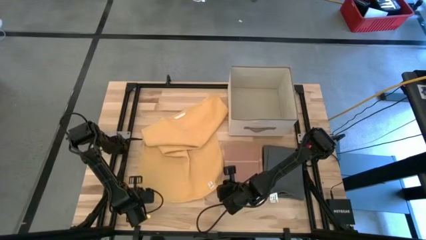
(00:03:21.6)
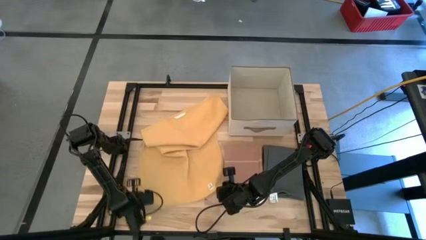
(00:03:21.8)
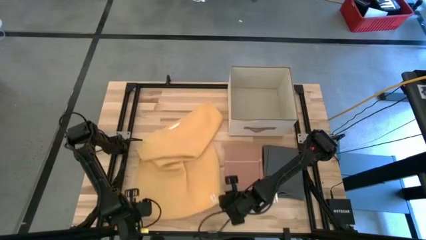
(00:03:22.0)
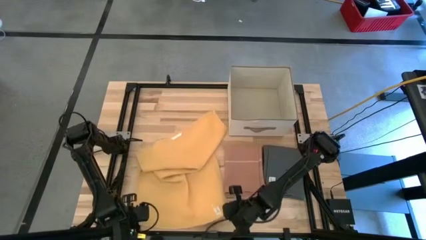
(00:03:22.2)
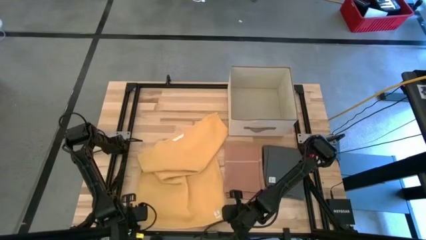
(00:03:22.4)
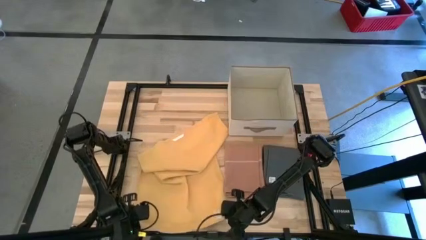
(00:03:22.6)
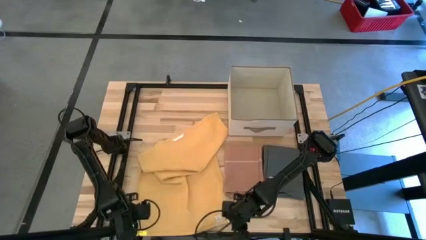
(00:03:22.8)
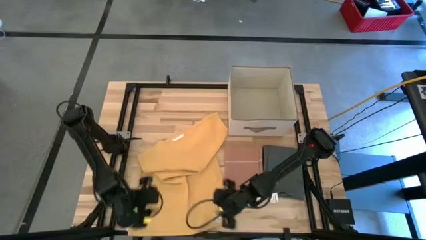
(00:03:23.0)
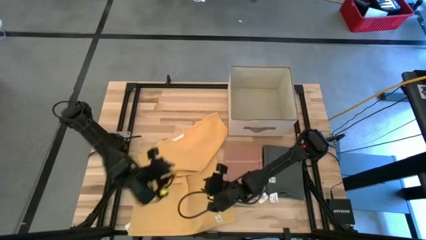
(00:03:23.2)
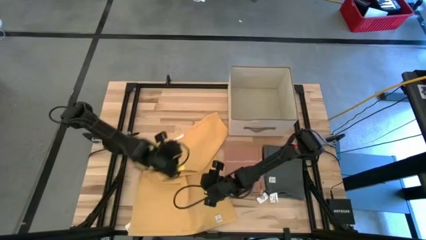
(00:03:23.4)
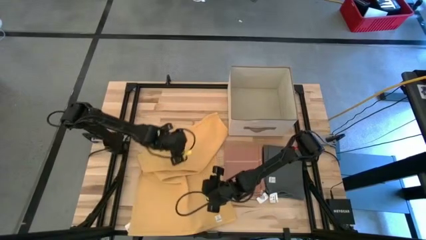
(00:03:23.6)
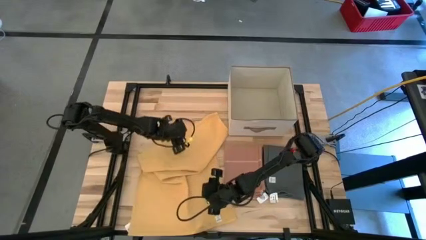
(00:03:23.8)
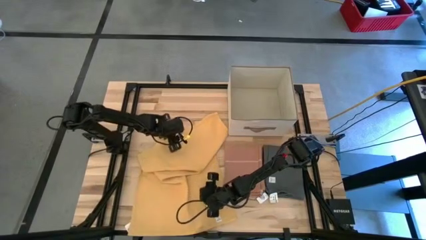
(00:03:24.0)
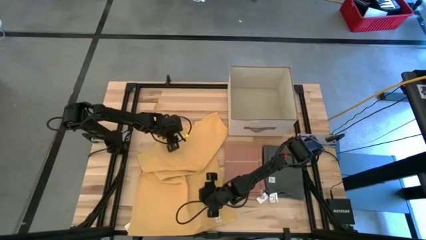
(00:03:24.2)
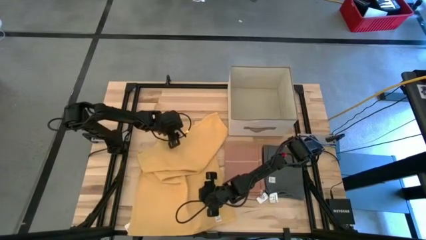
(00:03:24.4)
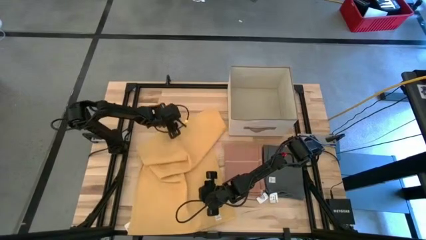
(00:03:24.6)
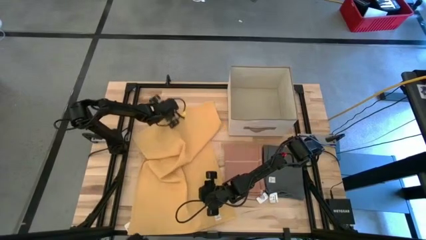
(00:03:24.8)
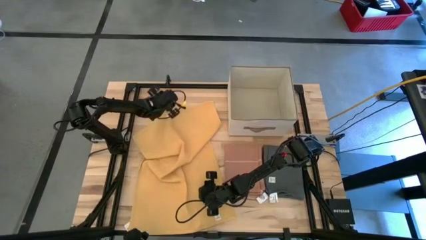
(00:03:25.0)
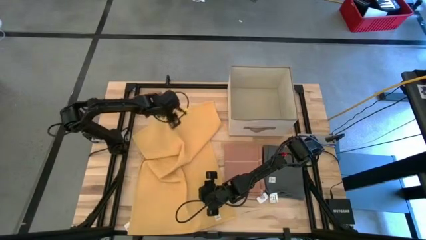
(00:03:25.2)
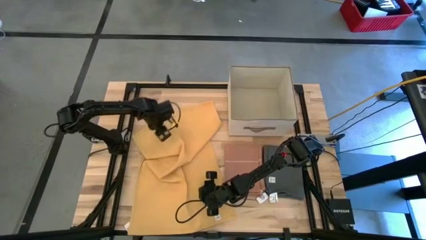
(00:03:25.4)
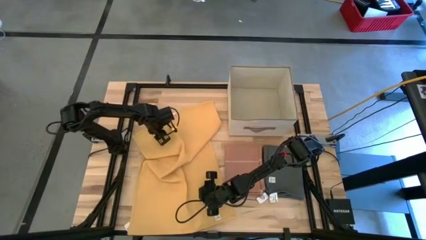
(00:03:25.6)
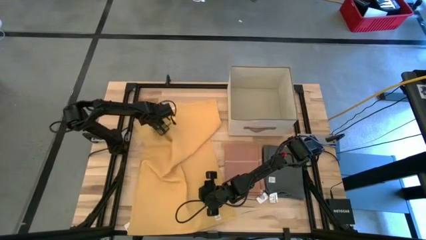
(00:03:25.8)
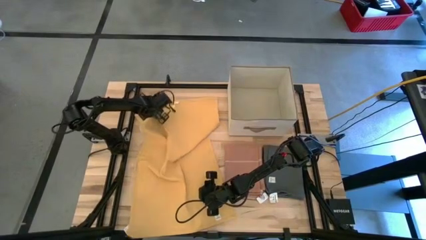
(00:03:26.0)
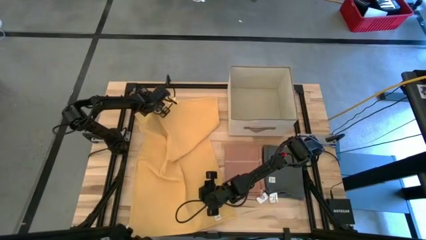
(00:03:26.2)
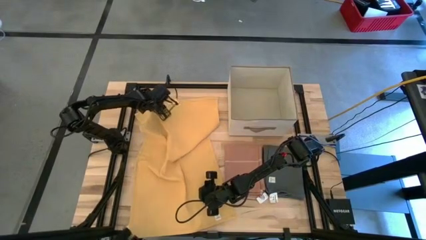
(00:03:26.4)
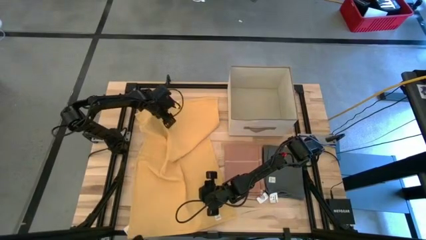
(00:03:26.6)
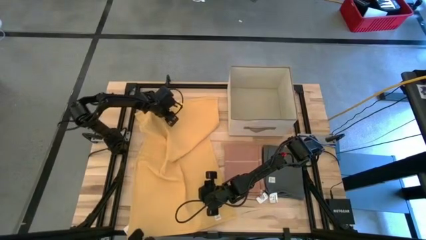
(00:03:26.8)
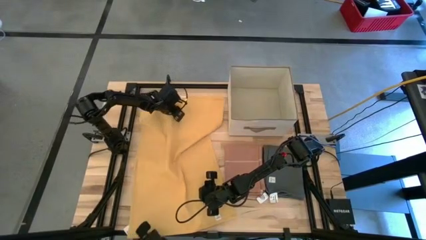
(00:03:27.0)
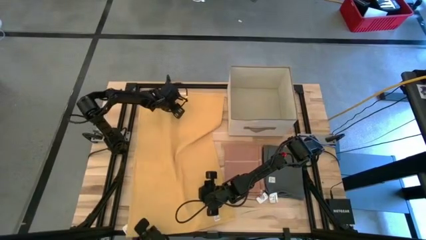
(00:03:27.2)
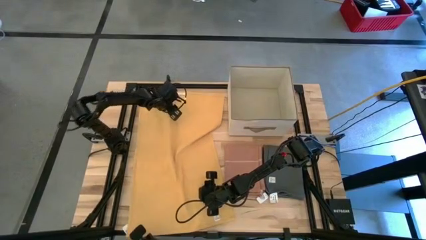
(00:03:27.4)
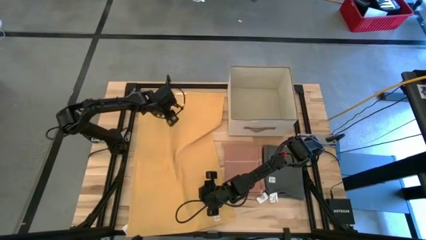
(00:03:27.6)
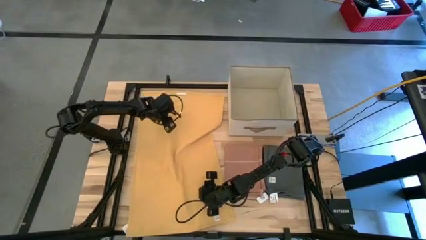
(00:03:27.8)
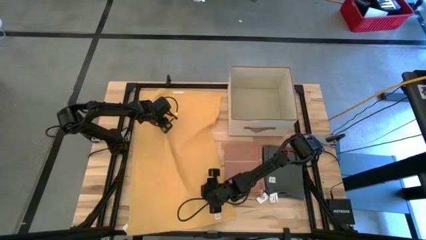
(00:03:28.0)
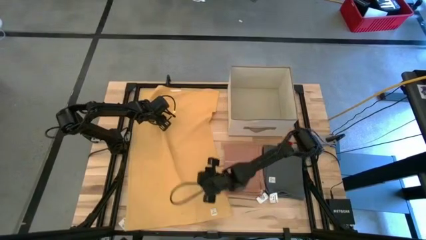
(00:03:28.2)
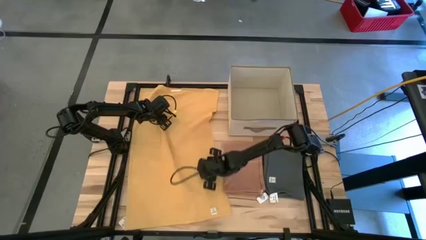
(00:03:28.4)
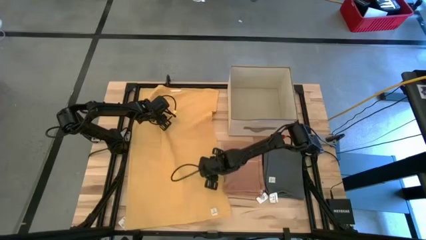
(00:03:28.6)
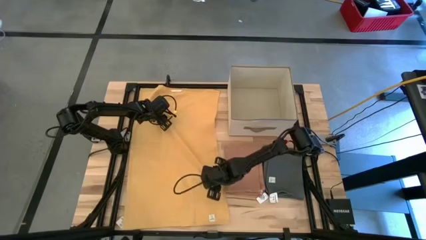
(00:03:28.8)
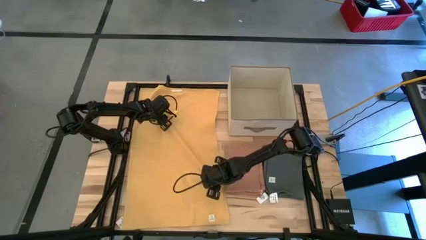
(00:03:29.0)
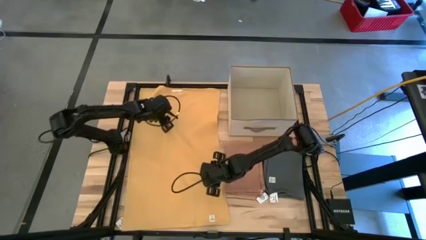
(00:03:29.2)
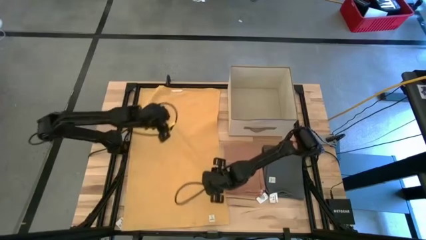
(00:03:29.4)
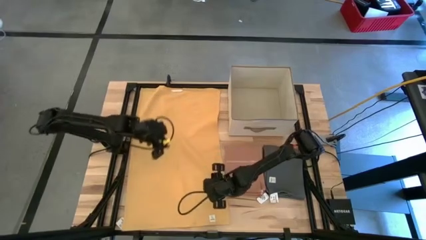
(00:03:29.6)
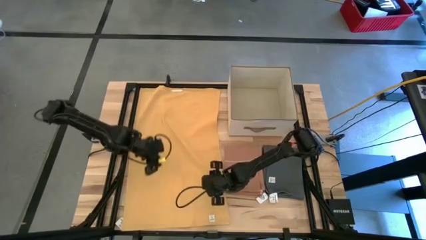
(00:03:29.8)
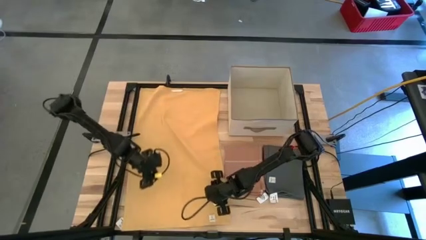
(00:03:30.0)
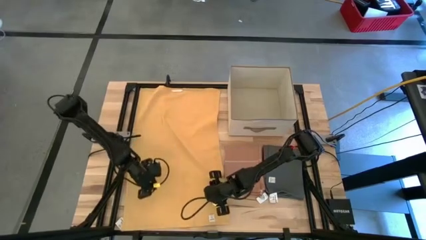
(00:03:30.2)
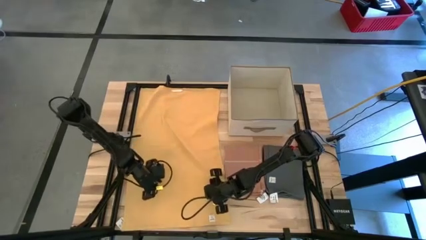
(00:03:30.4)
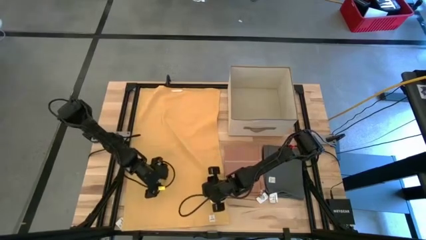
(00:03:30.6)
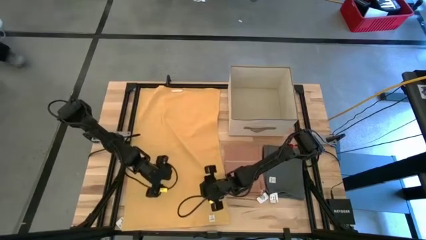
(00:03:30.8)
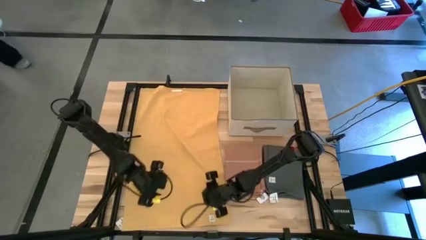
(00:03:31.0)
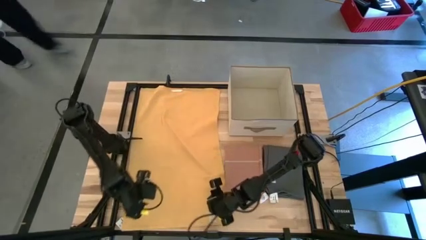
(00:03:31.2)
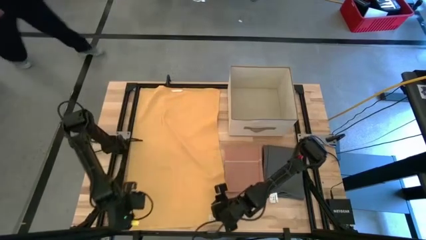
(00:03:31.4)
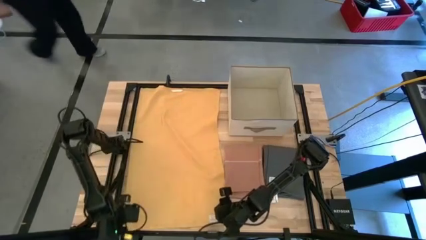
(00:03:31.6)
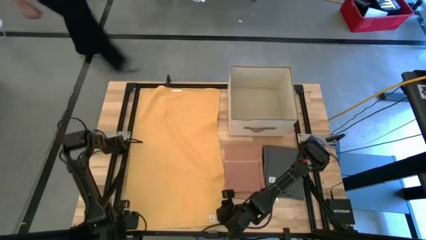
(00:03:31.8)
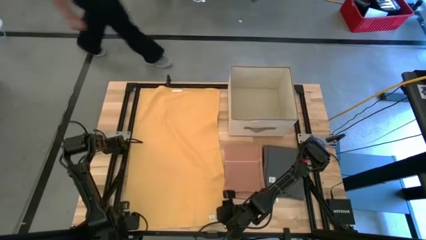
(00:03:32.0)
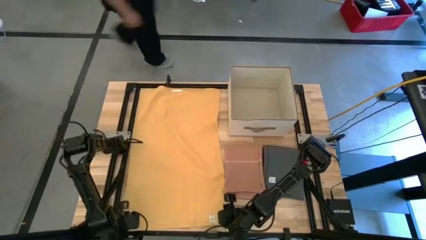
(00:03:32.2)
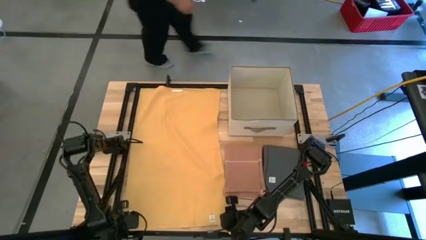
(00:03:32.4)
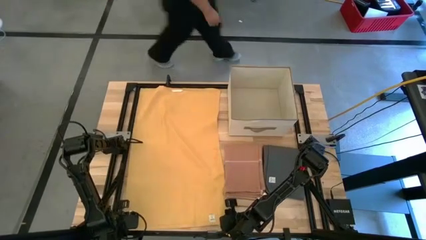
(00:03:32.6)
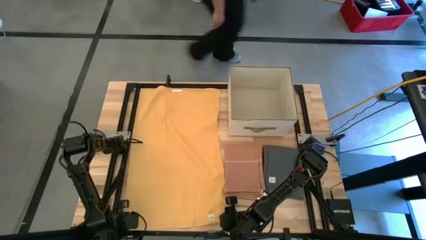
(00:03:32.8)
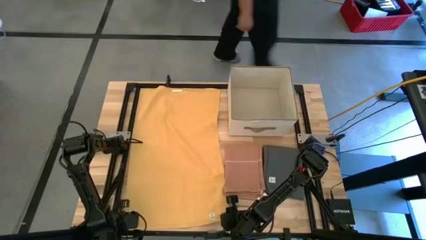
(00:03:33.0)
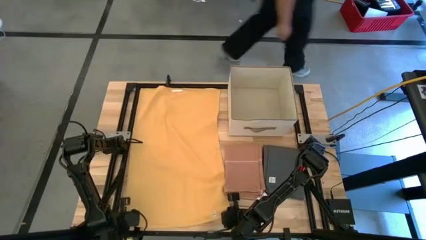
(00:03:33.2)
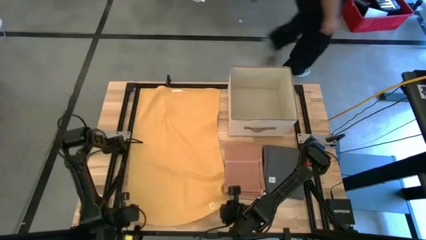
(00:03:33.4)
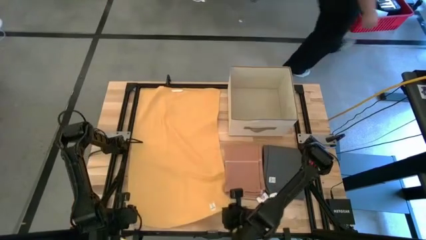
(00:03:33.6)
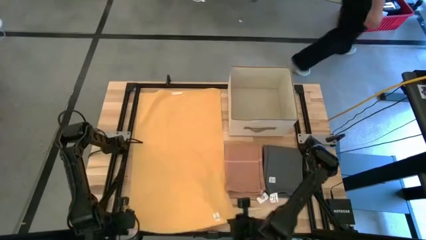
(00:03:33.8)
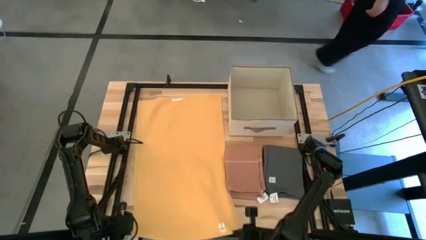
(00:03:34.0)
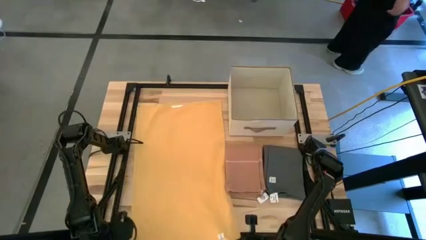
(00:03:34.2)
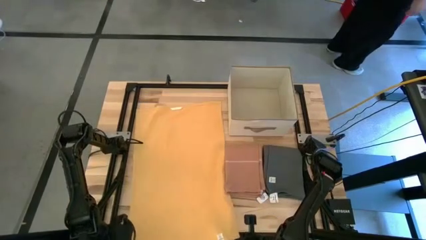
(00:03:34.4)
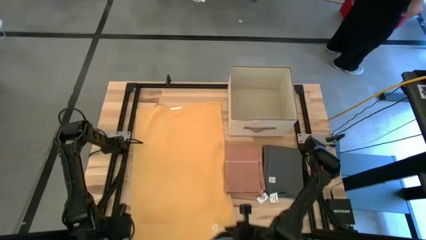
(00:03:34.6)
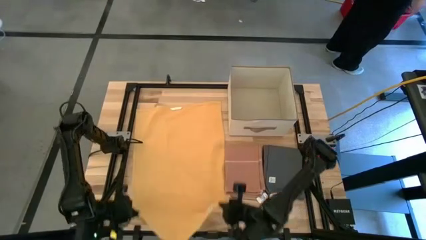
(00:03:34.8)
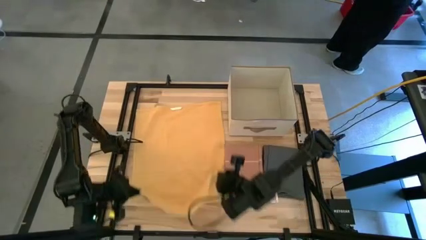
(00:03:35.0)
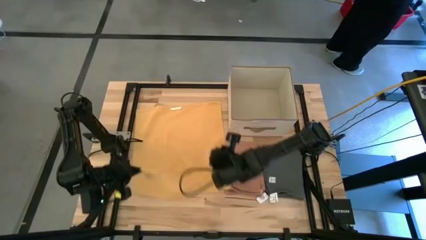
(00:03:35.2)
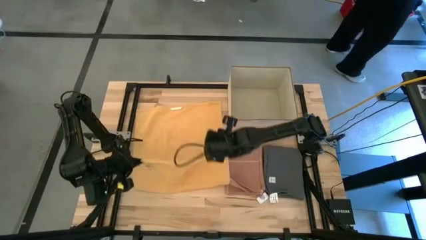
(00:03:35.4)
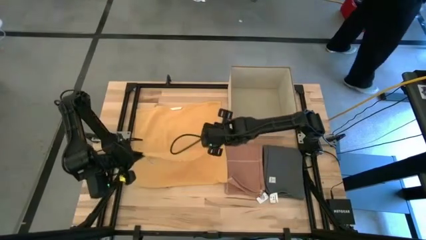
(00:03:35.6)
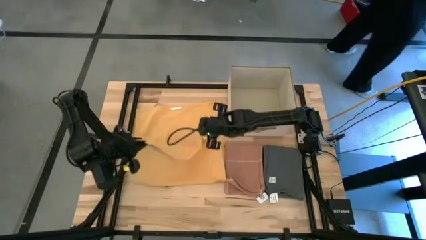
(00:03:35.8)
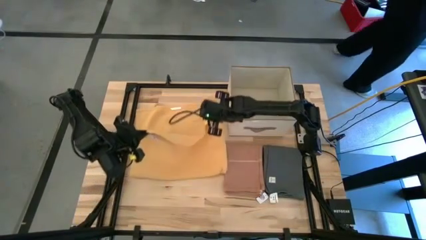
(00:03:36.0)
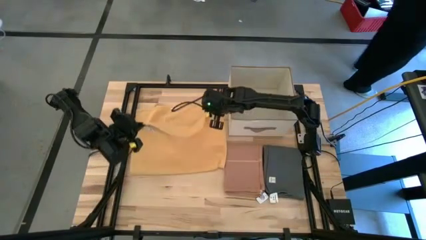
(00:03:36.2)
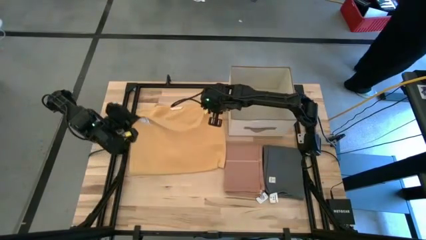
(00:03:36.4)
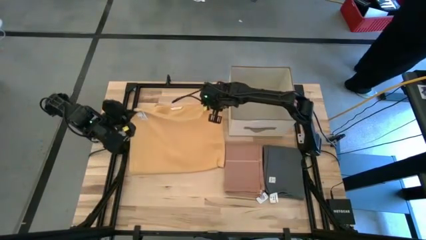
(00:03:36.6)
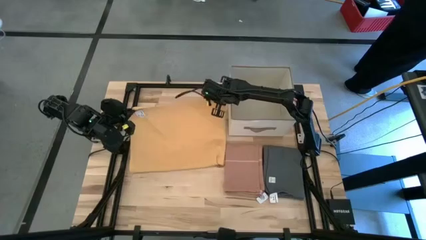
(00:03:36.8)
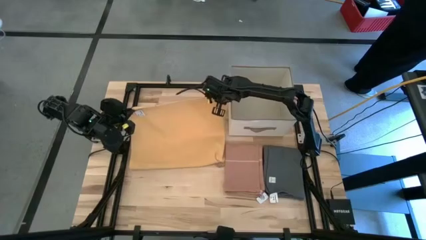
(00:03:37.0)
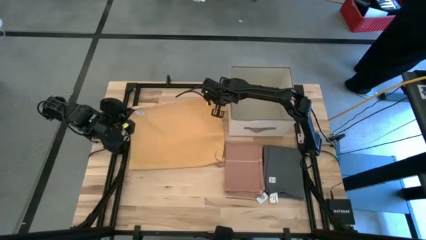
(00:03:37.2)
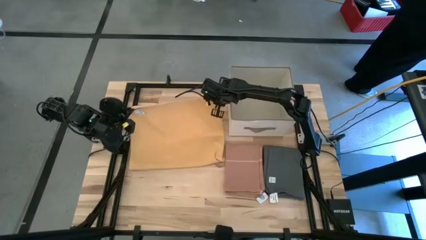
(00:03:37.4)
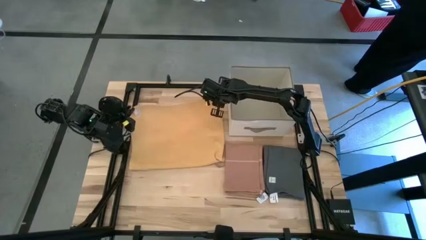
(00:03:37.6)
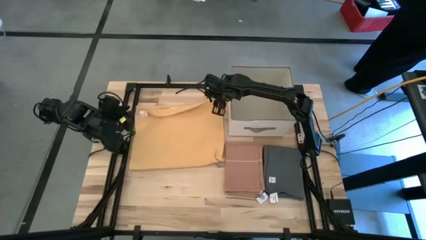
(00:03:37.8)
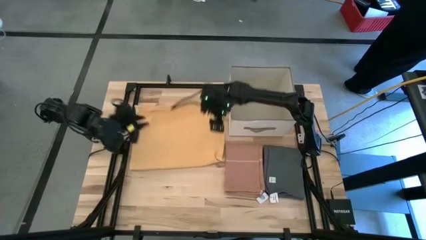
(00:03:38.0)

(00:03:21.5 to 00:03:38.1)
Task: Fold towel
Fold the yellow towel
